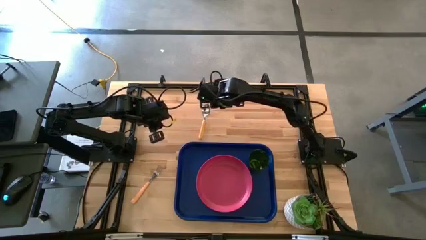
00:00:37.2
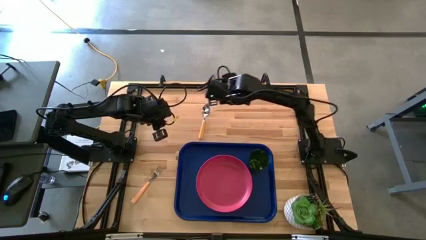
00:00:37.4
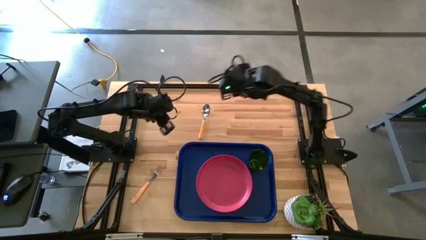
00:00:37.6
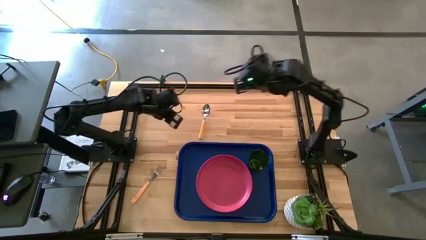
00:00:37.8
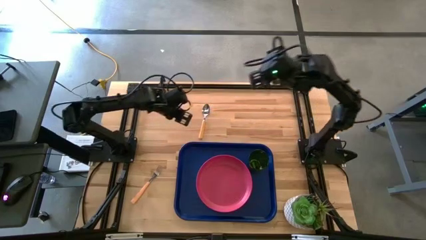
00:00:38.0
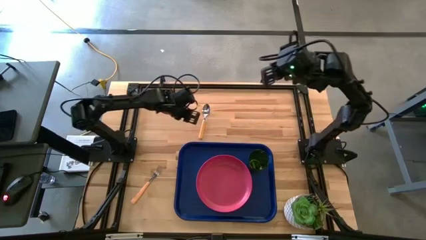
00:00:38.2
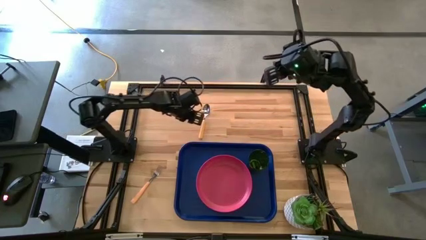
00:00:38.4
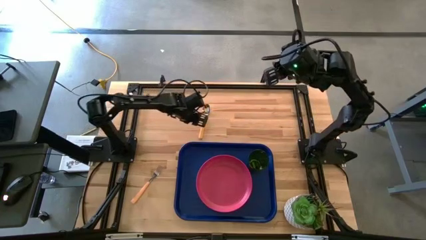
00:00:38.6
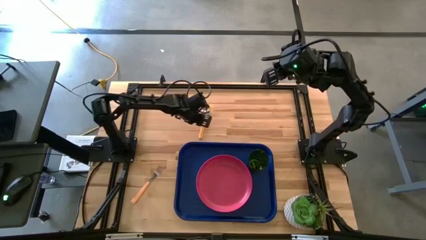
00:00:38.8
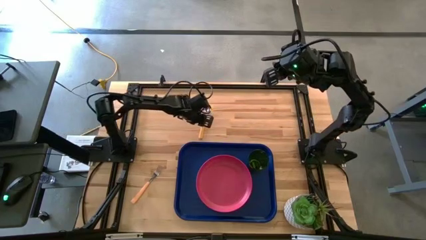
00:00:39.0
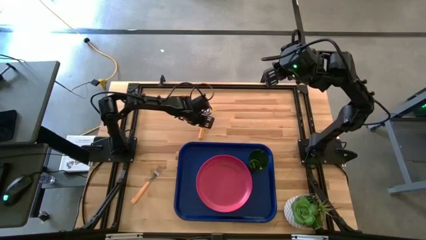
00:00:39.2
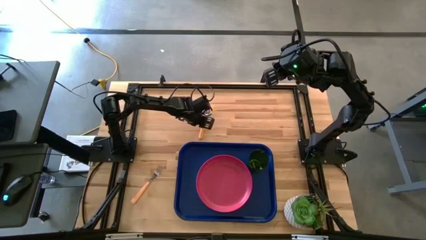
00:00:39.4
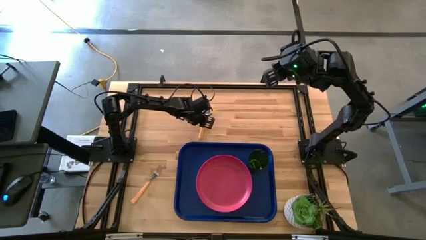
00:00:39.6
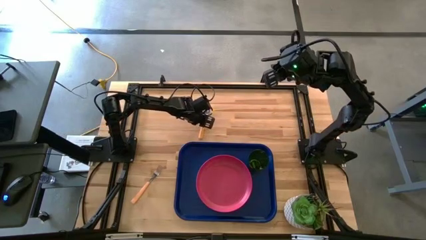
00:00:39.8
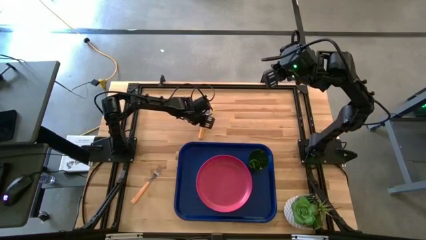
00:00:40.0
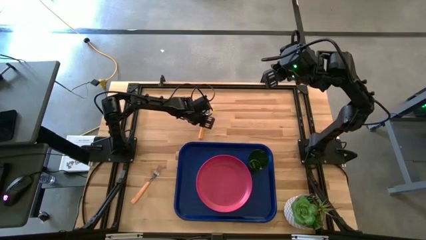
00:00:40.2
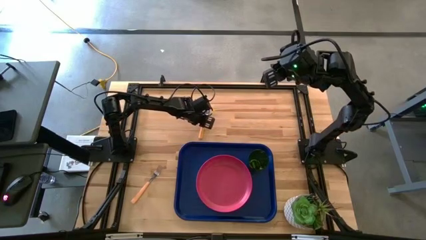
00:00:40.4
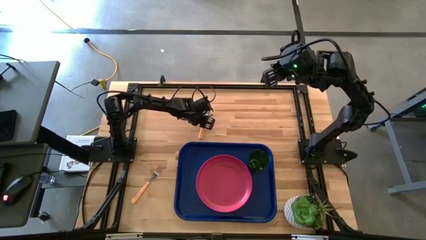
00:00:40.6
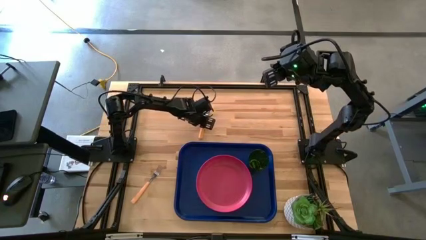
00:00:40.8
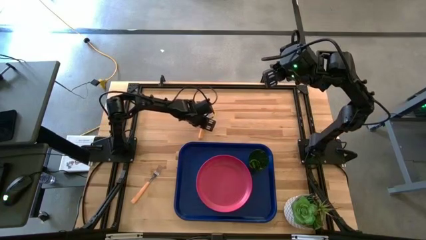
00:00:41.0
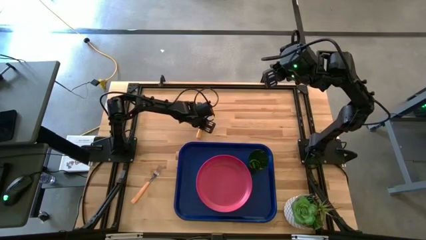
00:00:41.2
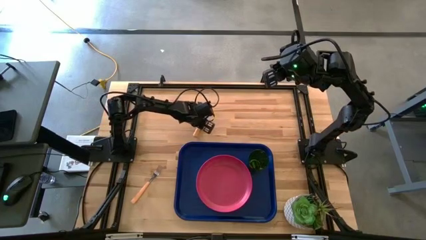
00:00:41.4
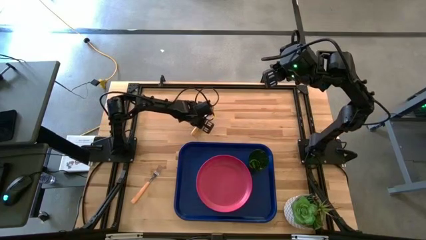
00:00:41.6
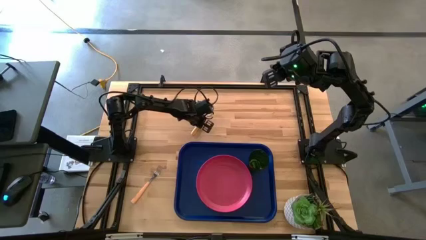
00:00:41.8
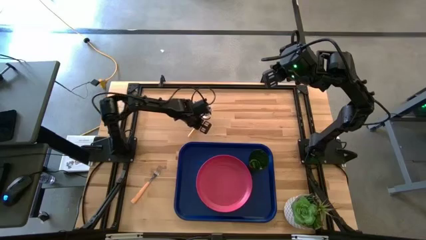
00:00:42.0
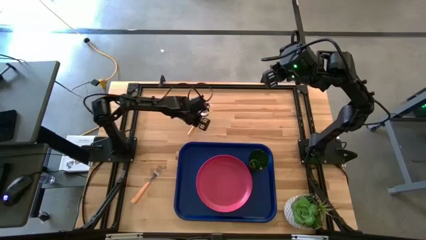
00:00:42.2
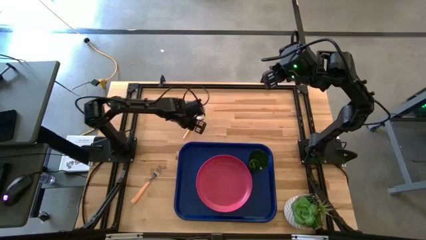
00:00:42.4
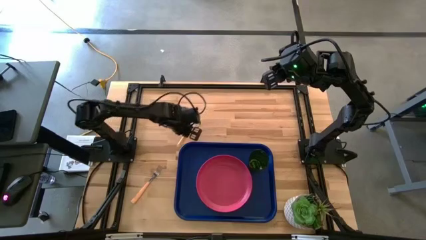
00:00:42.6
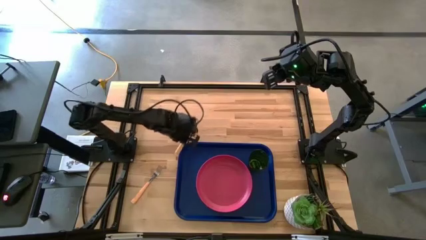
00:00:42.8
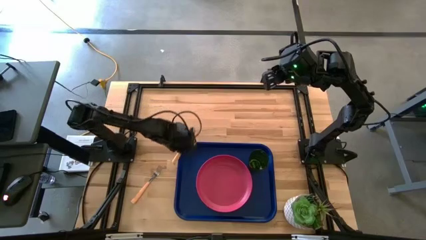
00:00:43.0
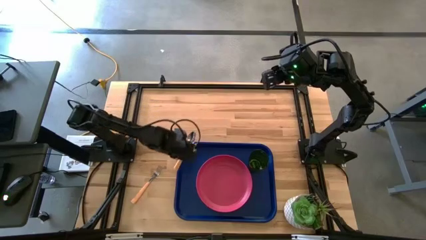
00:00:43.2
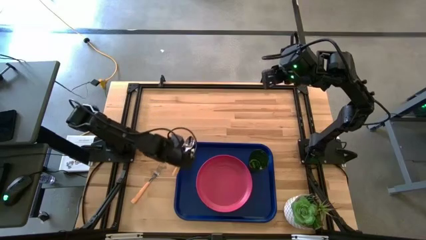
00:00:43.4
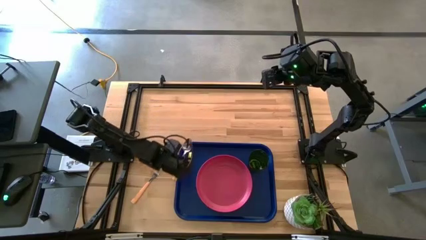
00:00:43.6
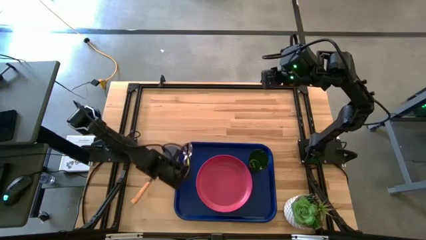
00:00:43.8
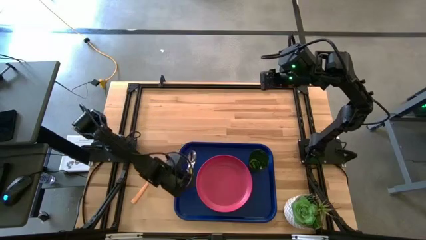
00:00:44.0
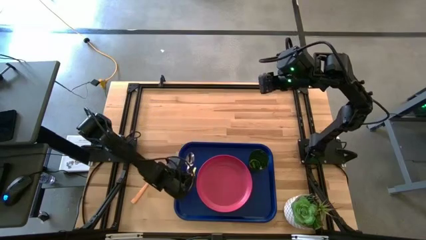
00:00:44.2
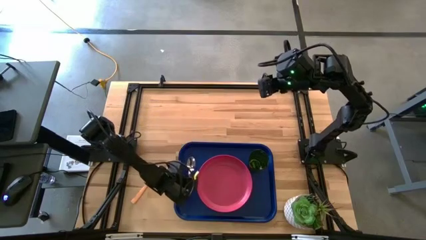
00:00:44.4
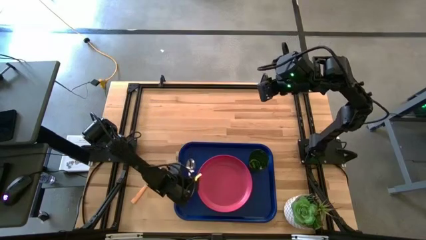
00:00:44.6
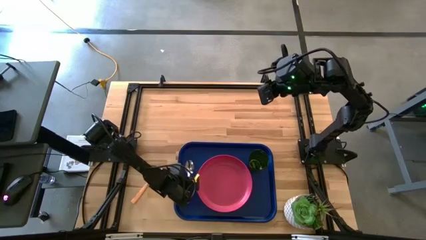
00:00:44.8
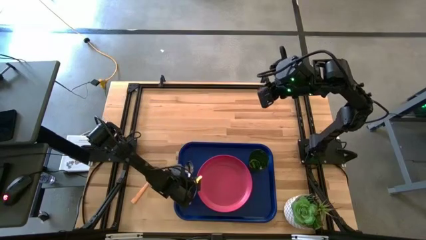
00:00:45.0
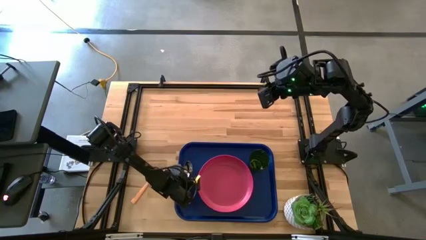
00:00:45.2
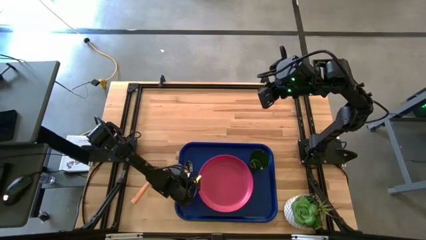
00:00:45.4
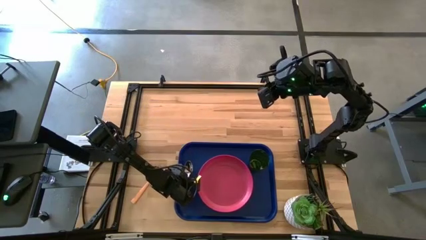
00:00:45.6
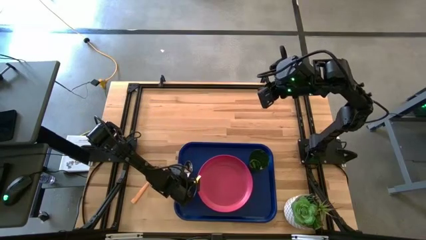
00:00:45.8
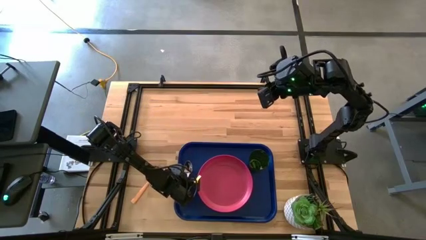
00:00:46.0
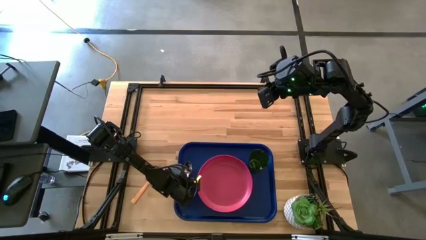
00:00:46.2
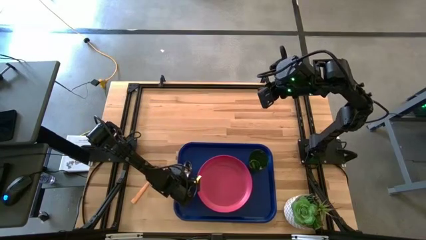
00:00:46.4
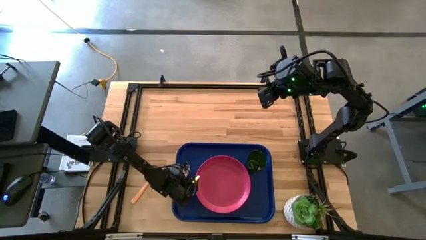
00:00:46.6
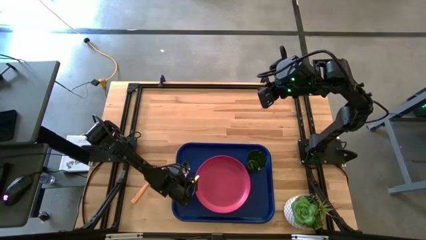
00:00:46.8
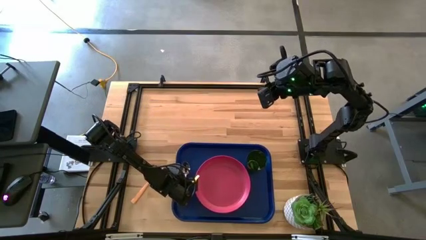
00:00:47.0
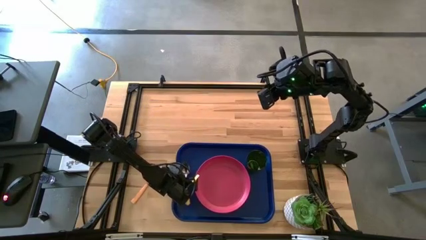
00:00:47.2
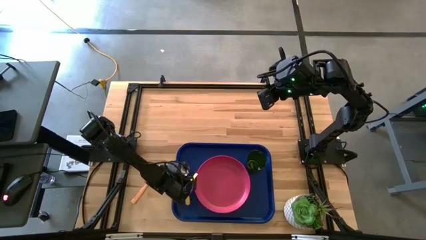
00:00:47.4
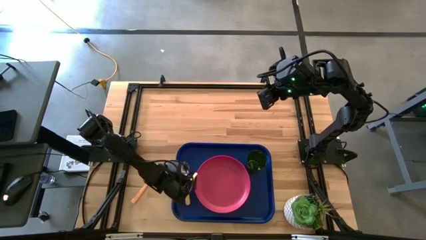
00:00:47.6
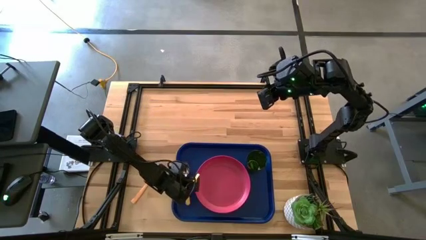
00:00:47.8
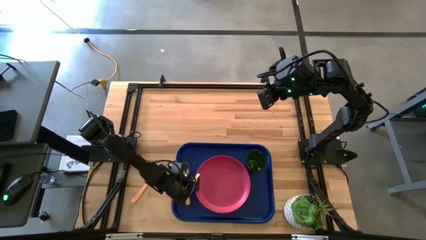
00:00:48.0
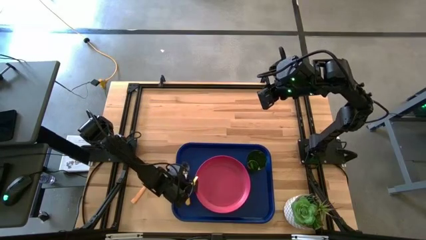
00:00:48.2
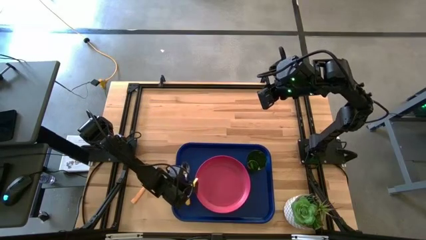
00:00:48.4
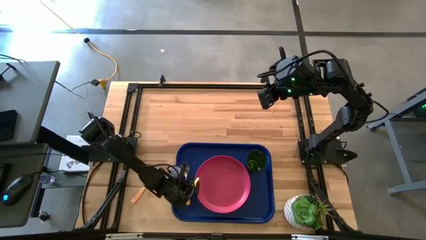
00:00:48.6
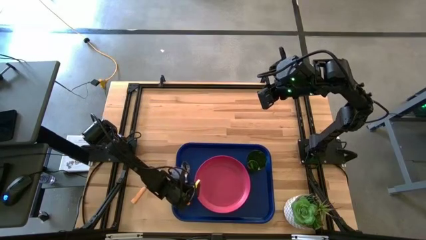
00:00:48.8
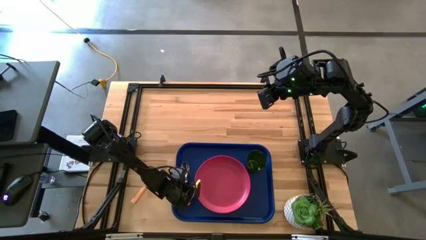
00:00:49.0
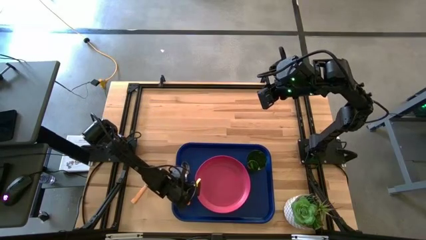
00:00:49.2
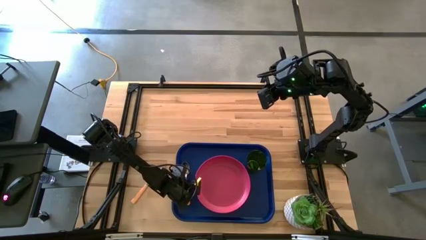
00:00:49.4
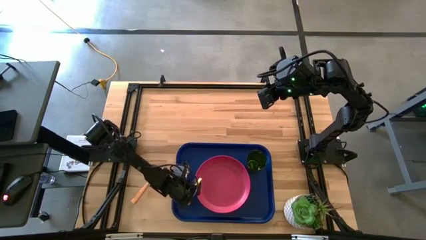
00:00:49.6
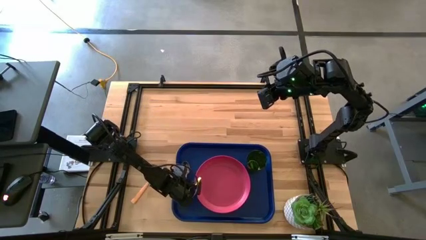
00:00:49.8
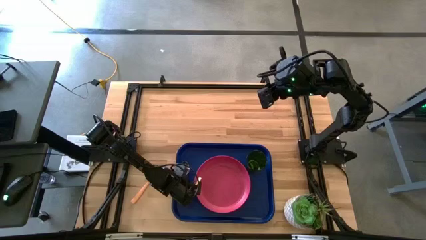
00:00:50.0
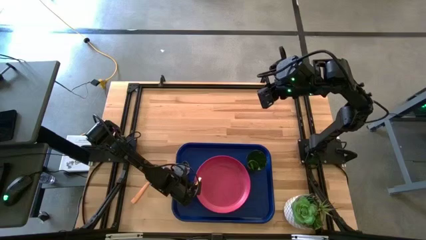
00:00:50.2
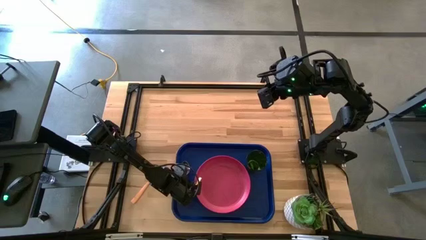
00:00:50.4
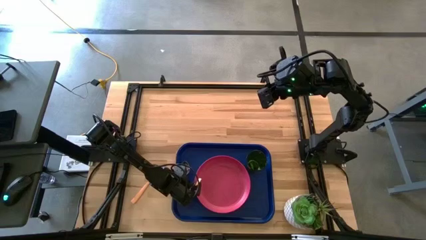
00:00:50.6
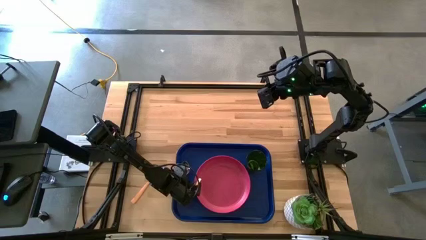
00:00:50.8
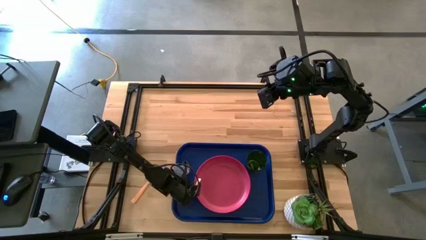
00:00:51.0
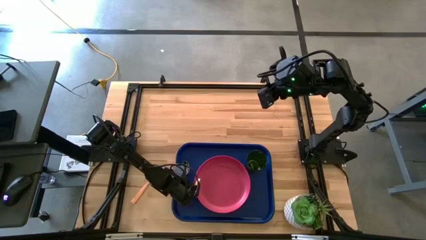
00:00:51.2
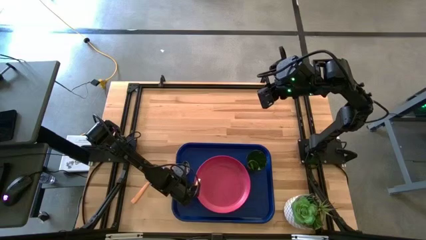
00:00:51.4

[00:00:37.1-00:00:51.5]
Task: Pick and place plate/cup/fork/spoon on tray
Put the yellow spoon on the blue tray to the left side of the pink plate

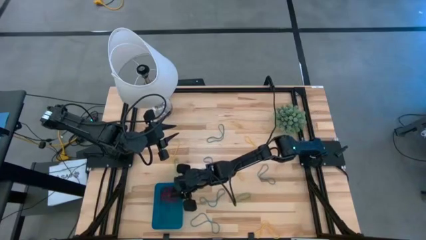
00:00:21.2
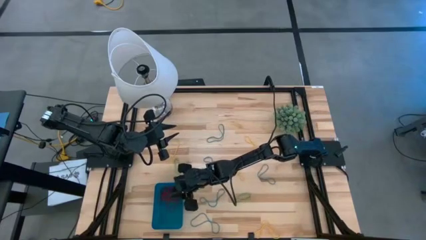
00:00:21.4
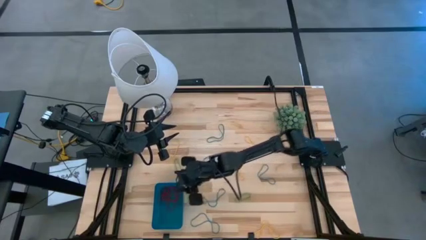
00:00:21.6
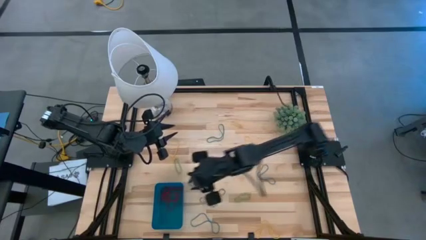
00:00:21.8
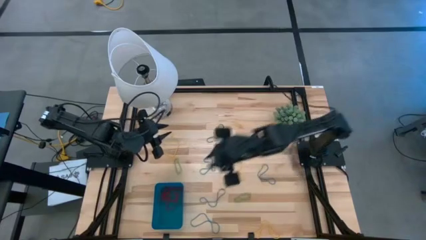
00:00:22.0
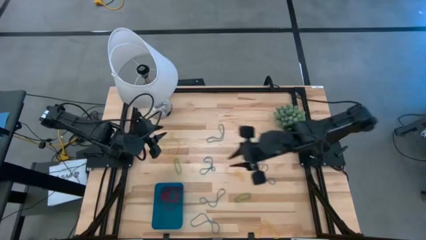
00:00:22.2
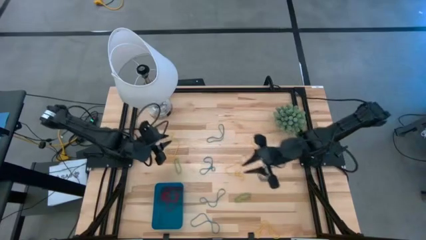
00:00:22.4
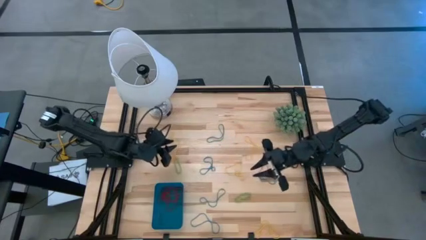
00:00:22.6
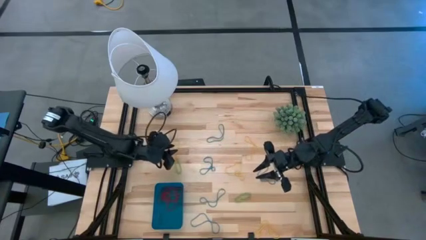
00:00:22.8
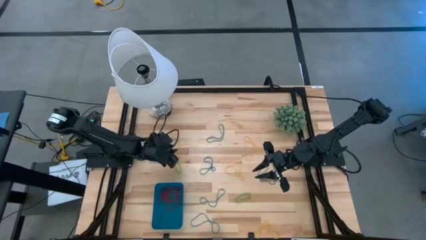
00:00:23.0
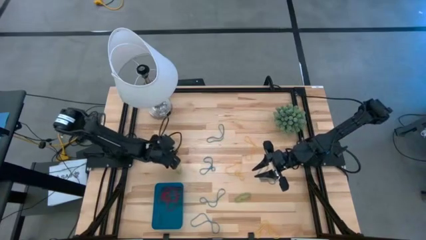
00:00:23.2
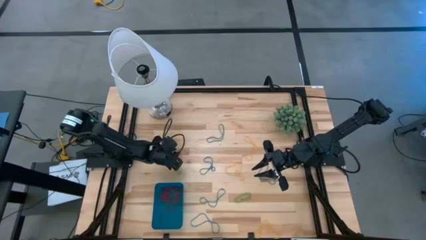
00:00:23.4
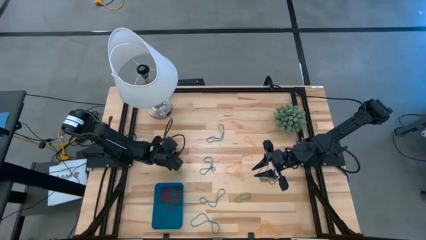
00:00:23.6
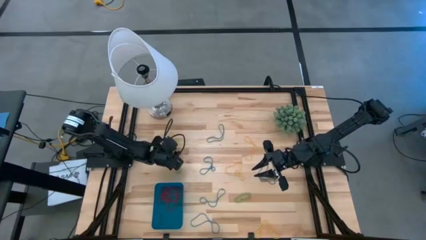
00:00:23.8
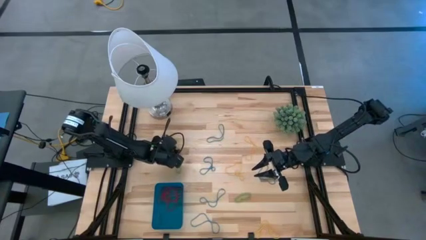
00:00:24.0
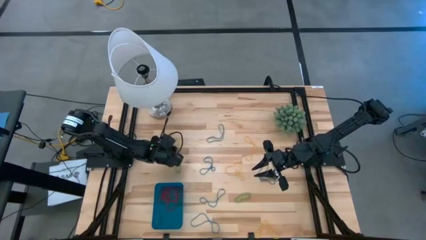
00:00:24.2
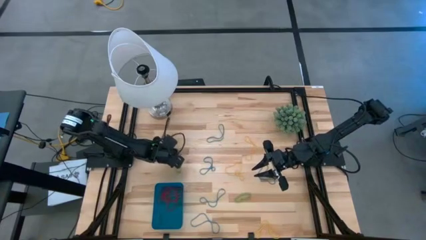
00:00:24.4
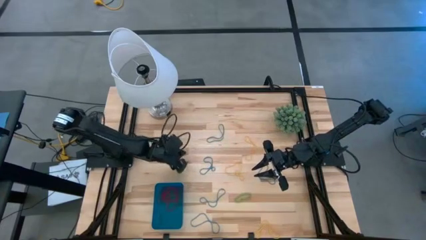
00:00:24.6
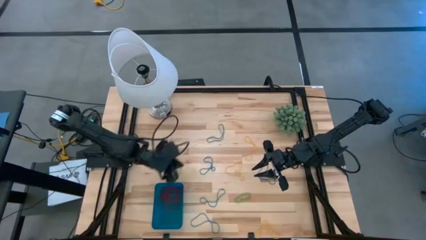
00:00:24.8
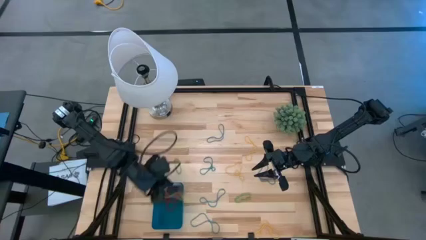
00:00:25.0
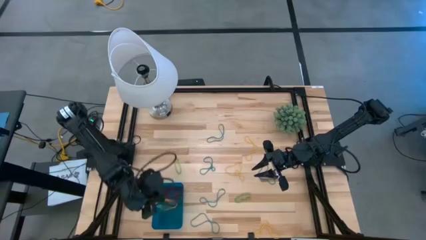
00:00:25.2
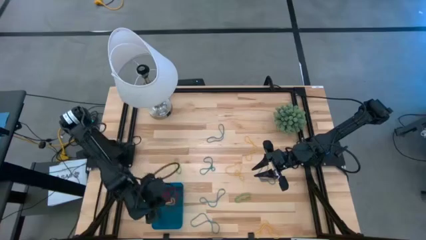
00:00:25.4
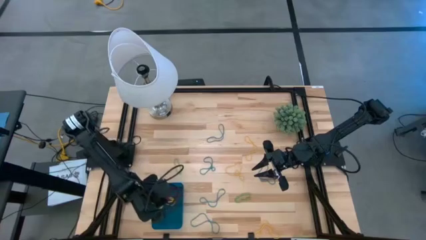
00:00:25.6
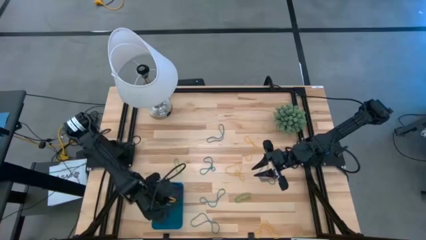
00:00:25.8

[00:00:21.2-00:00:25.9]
Task: Pick and place items into bin
Put the yellow rubber band into the blue bin
